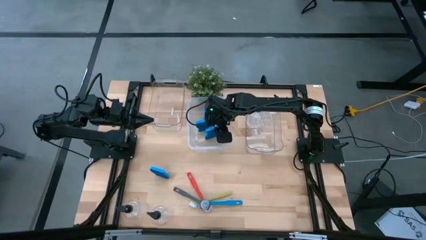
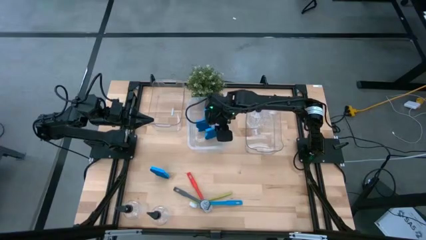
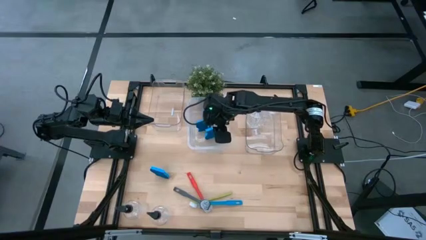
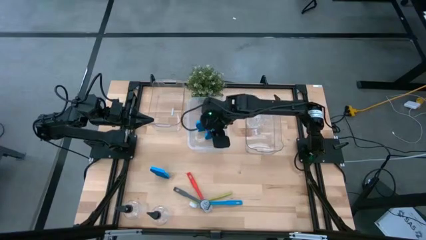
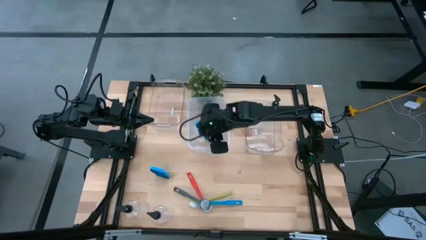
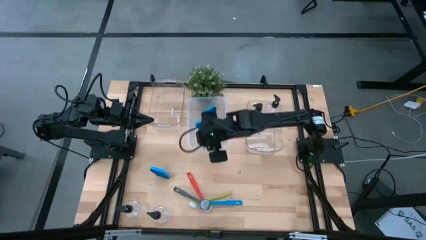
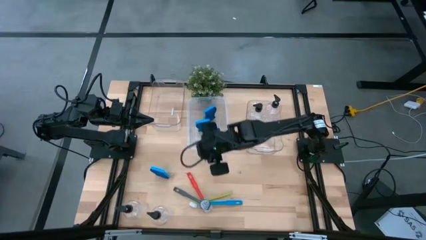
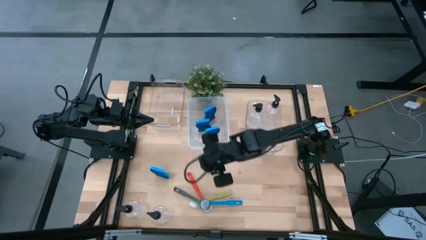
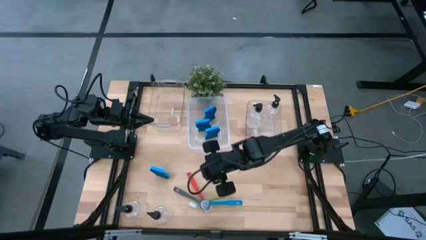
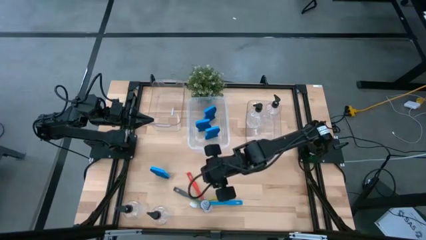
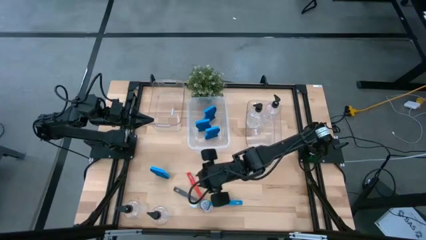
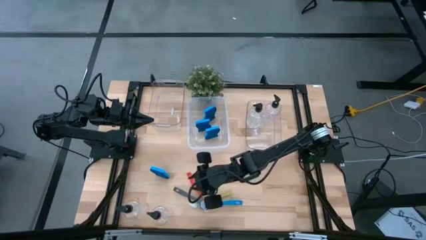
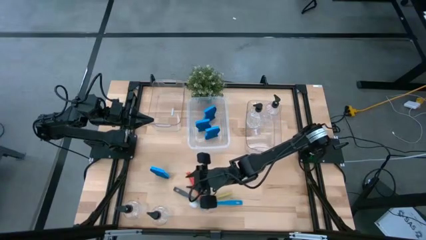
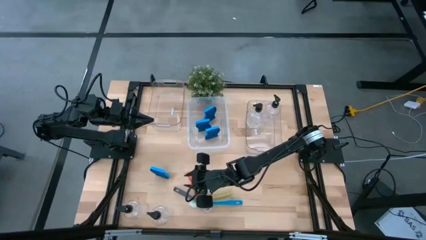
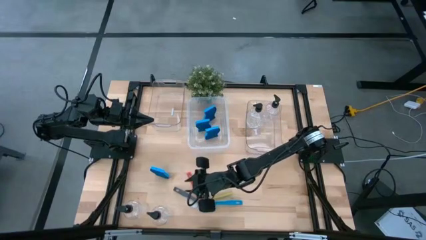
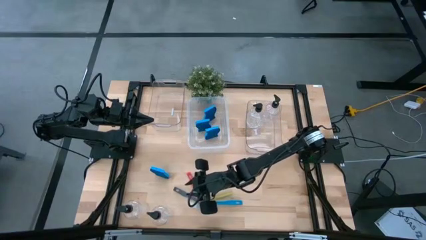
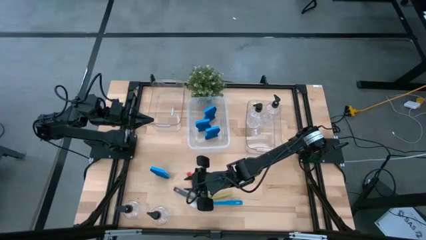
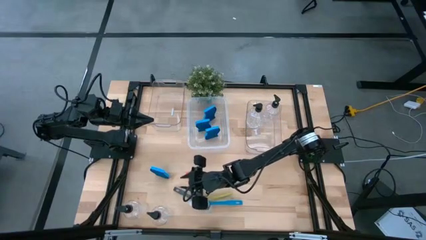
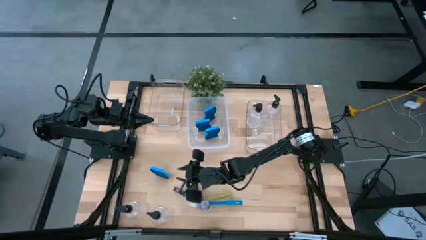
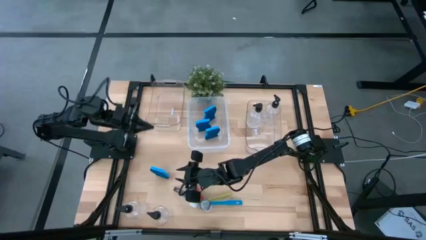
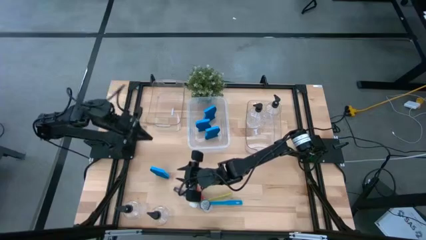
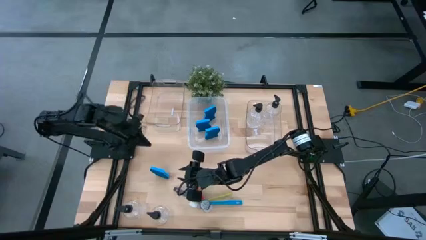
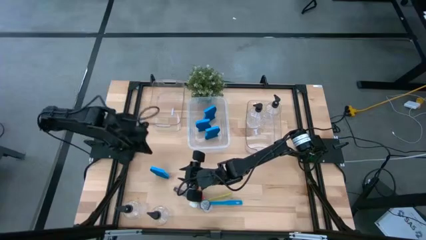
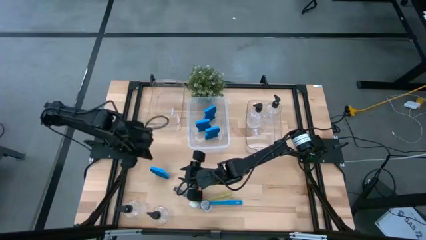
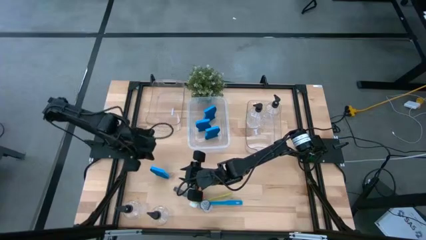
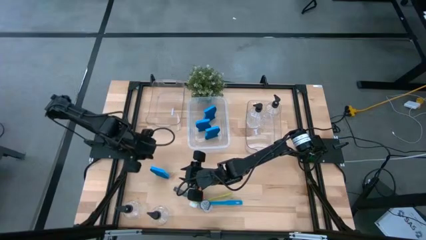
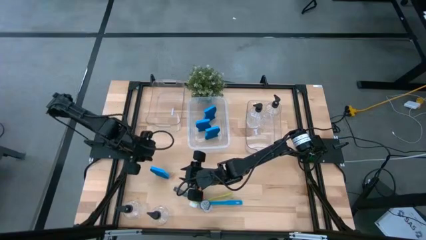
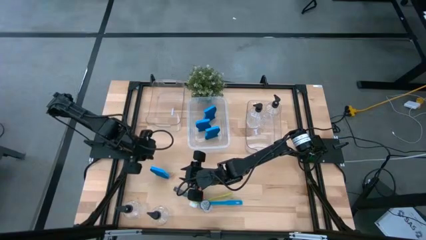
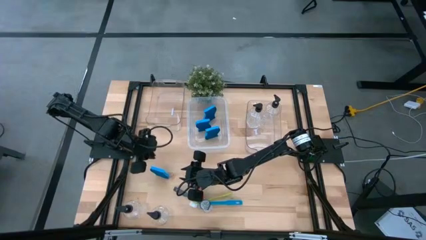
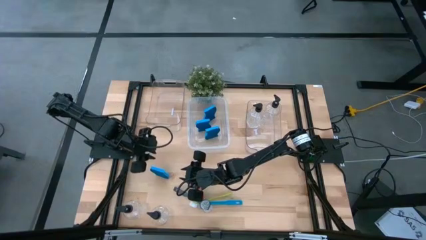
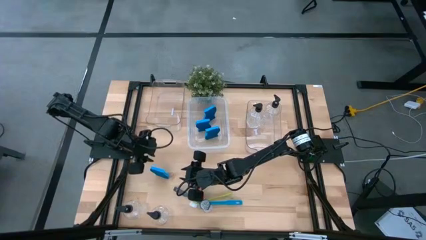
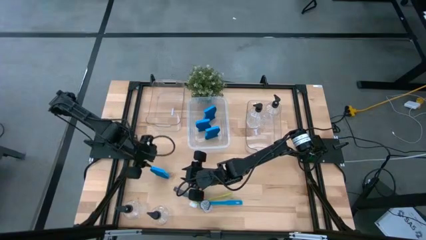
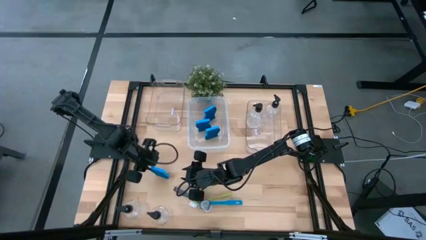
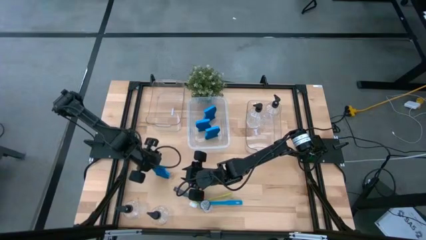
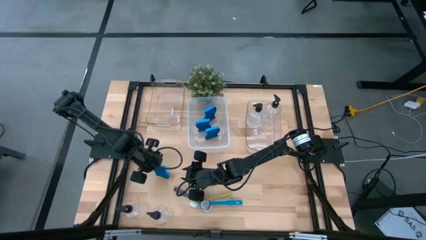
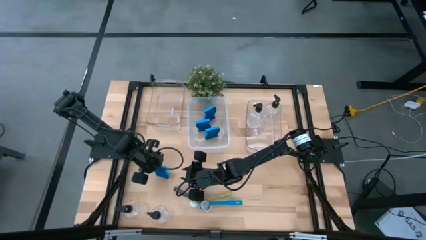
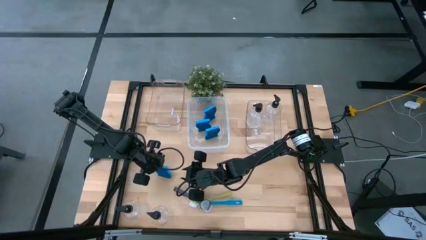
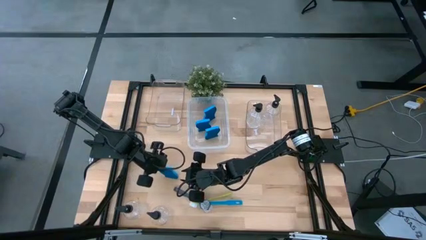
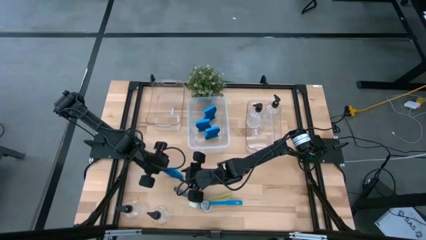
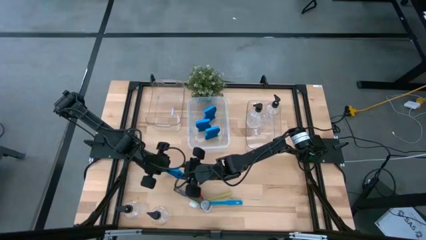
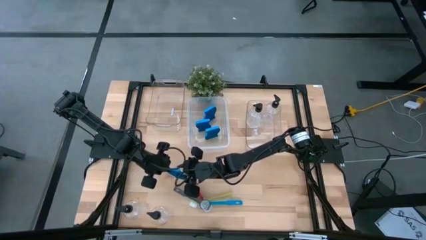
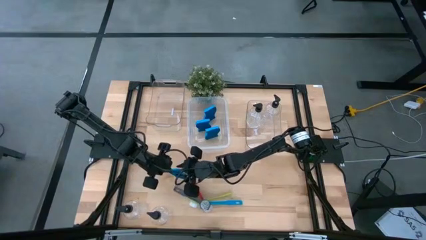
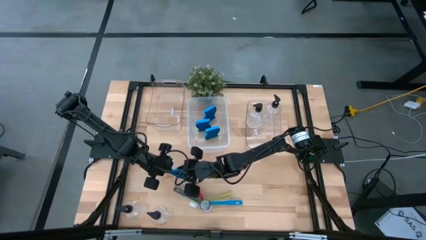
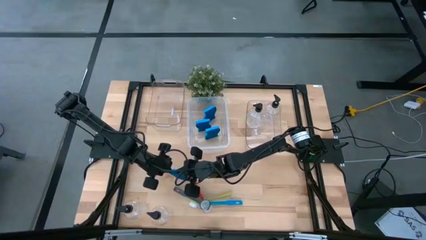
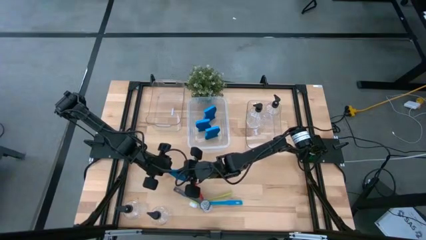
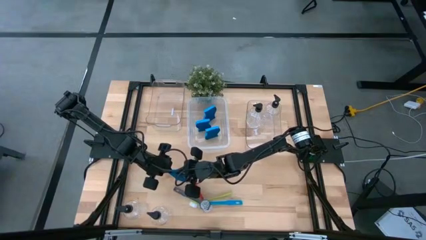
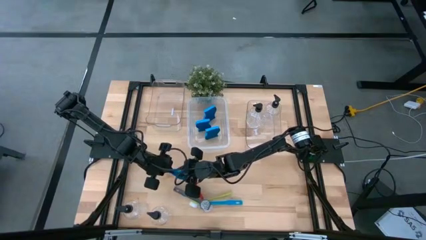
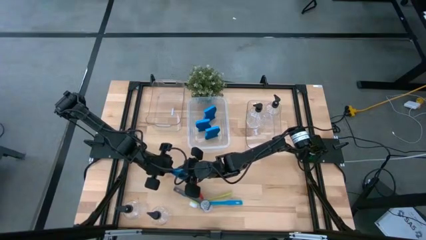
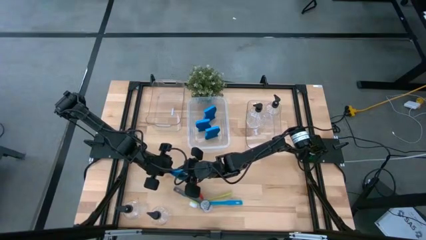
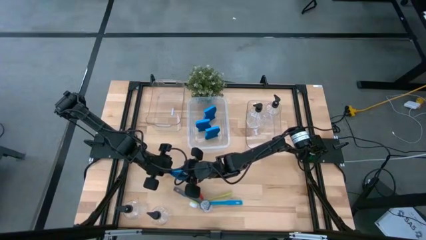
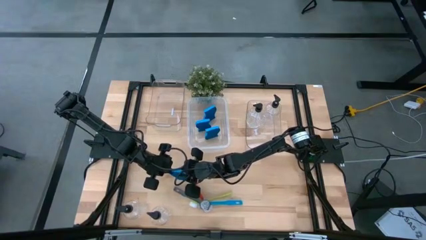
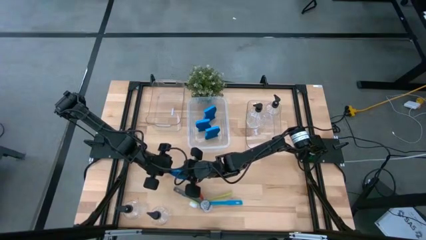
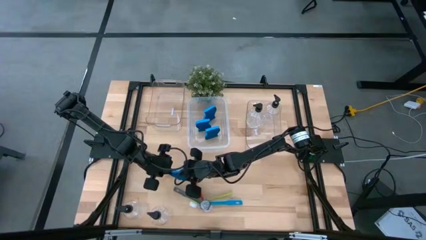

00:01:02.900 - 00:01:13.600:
Task: Pick & Place Kitchen Sink Supplies
Put the blue sponge into the middle transparent bin

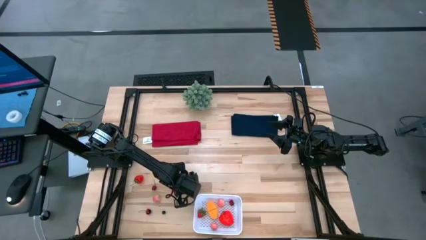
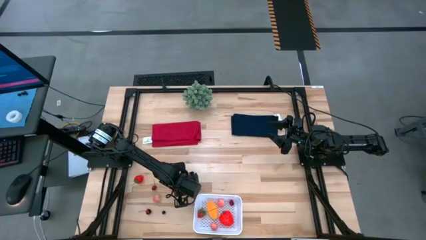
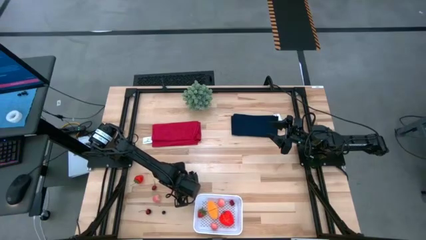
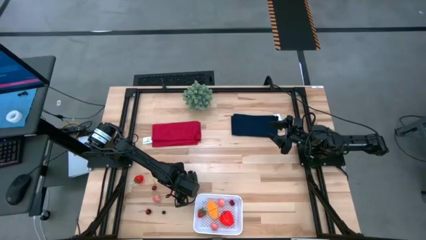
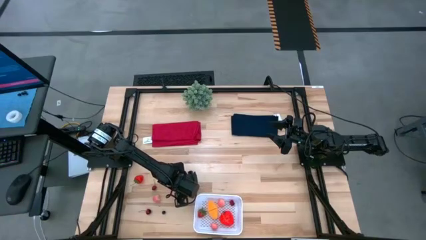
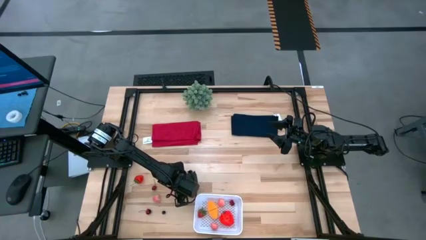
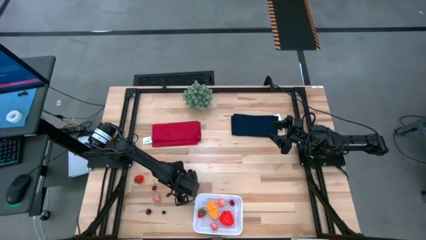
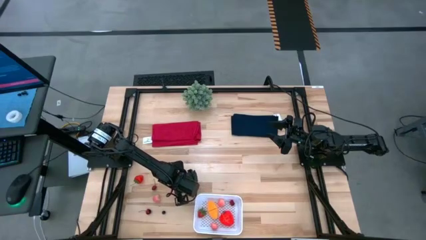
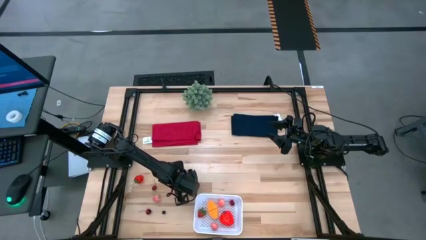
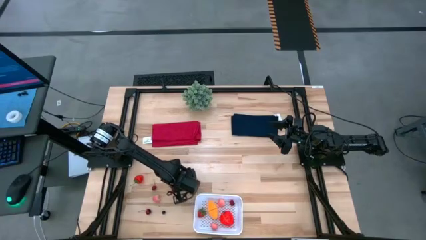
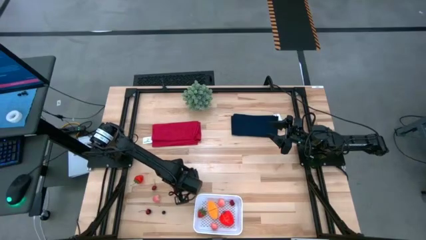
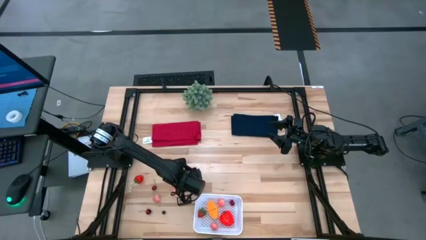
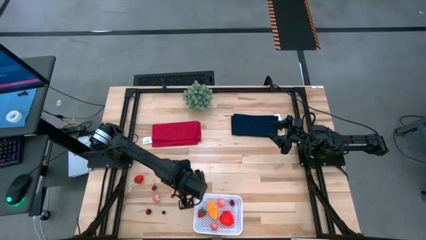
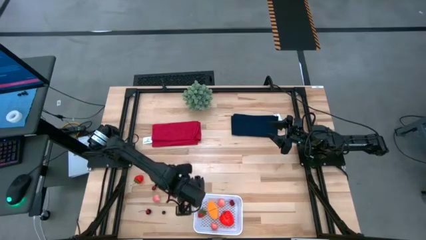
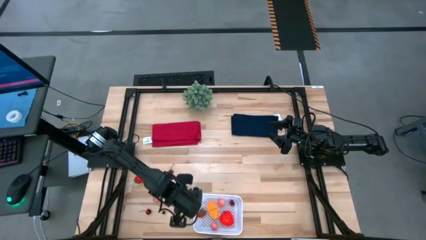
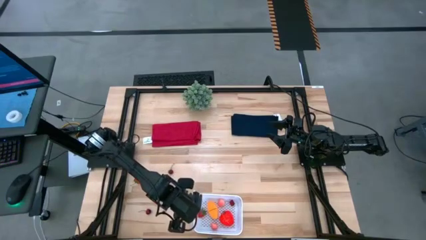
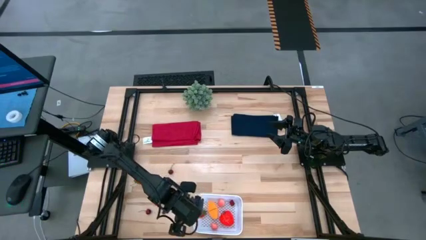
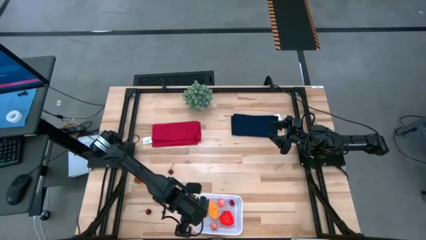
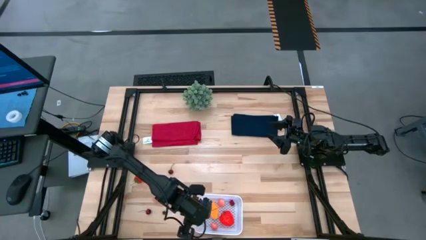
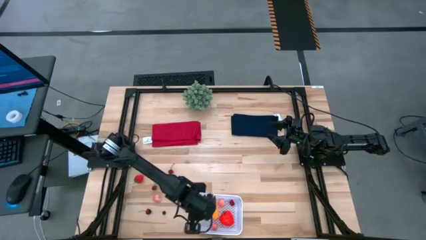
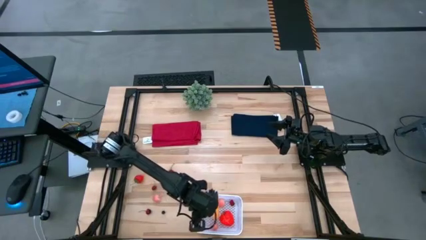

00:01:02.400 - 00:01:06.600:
Task: Pick and placing Produce into tupperware
Put the top blueberry into the white bin
